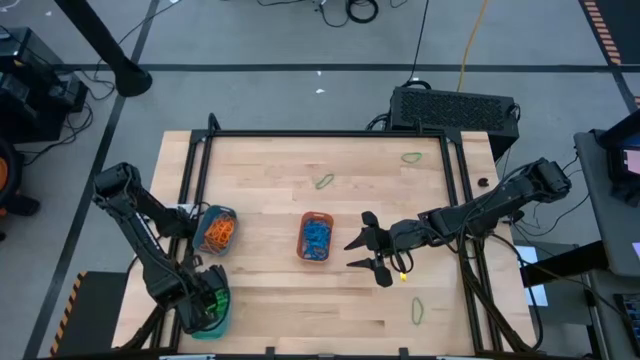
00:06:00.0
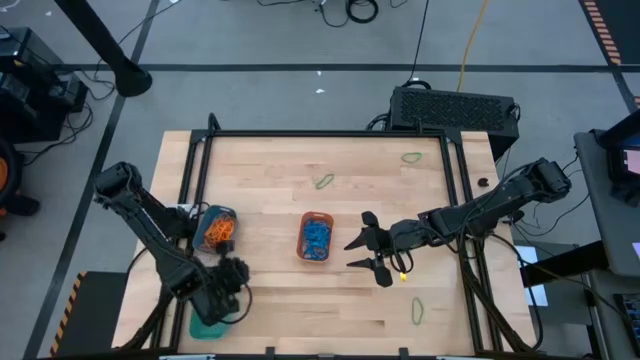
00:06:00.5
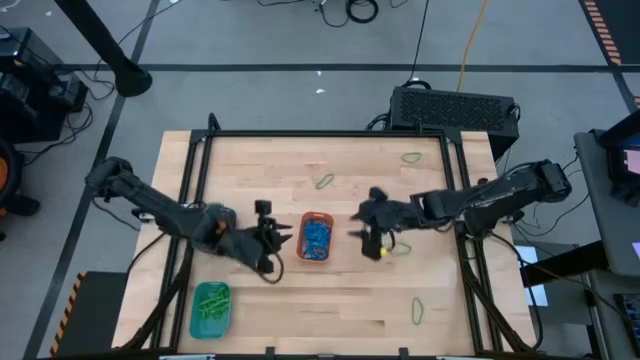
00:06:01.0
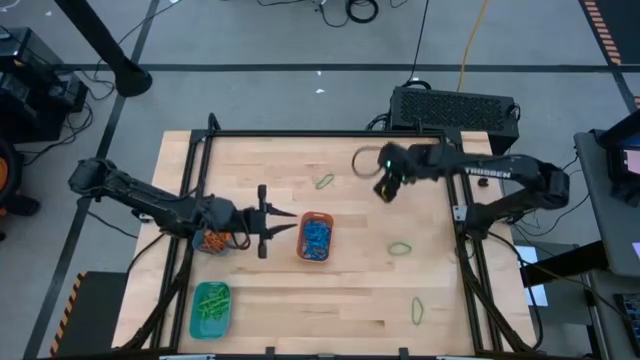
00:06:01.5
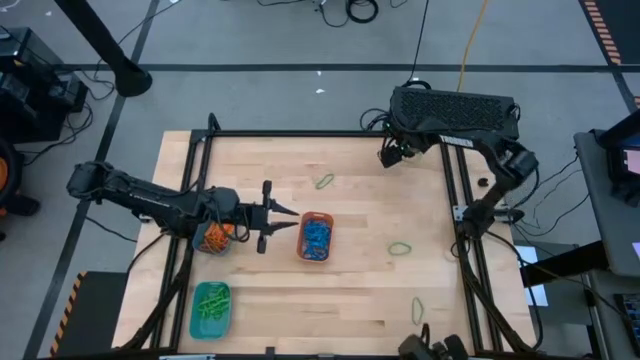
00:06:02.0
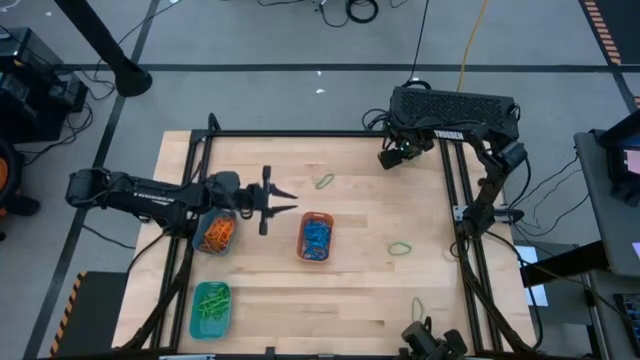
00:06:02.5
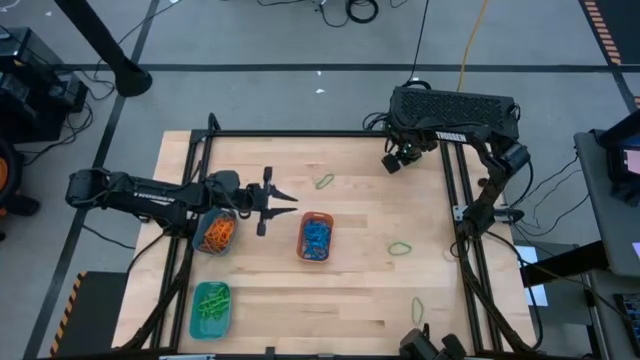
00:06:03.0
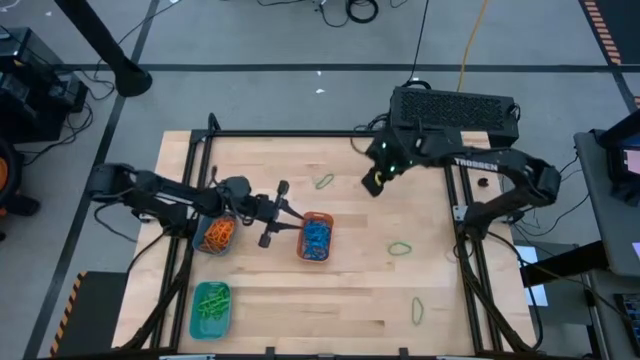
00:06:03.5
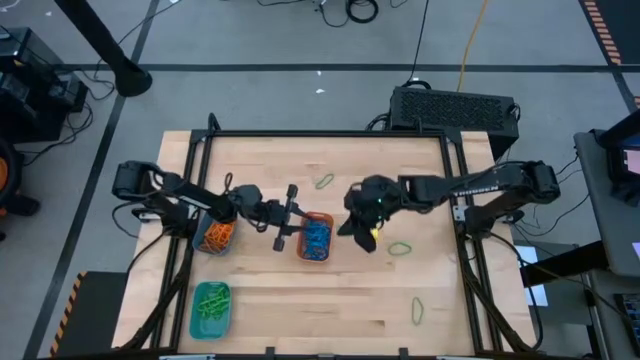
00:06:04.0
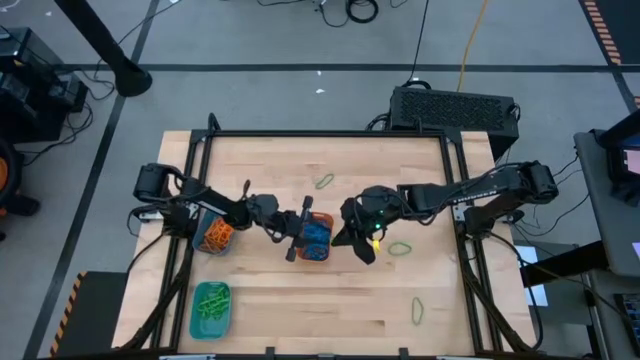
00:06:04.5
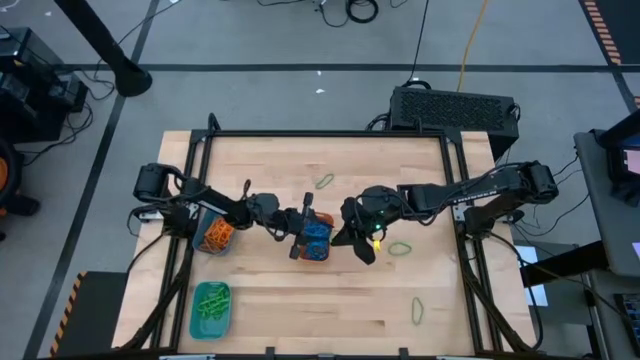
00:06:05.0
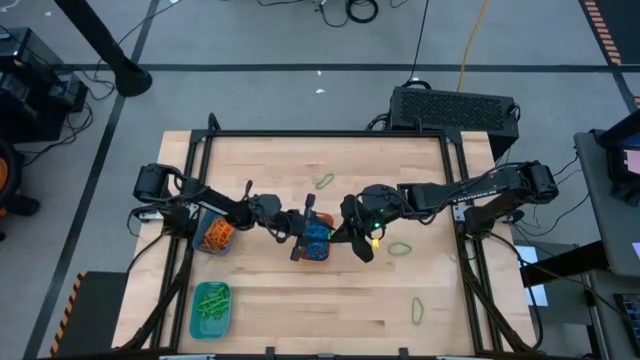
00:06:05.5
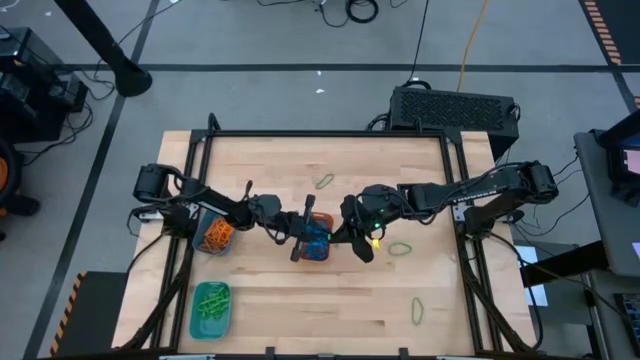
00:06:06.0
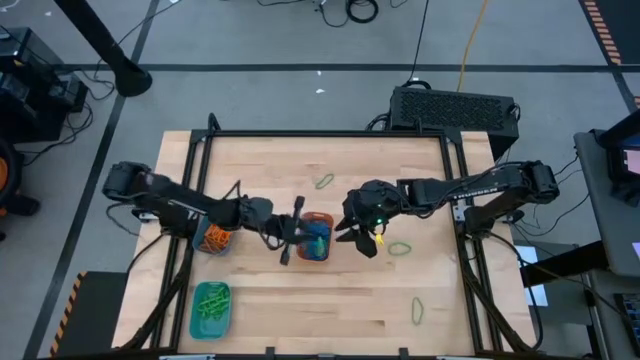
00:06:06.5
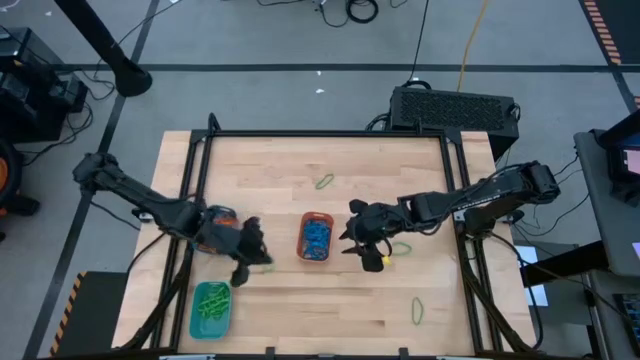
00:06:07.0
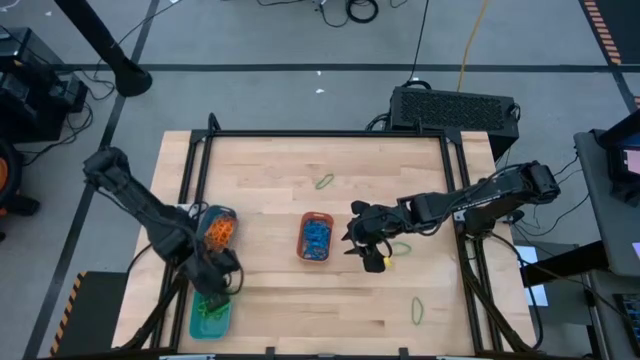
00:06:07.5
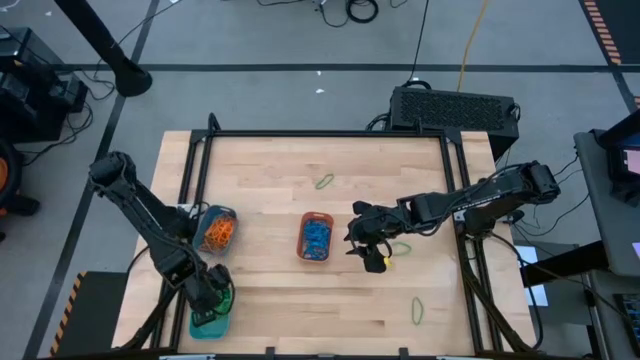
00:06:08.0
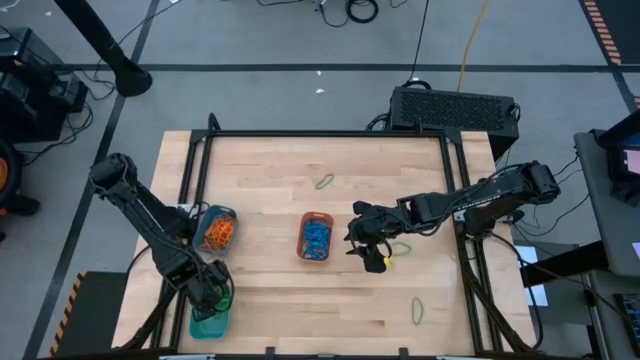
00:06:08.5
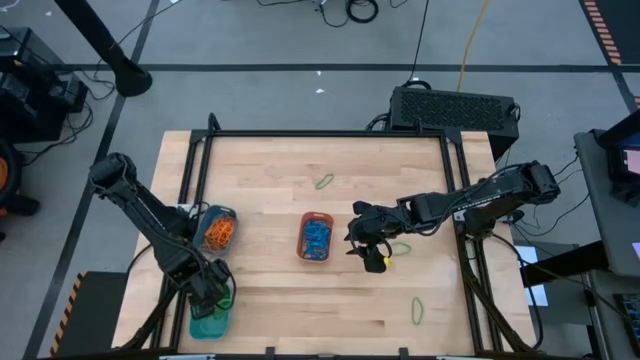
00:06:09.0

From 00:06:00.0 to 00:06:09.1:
Task: Sort rubber bands into baskets
Put the green rubber band into the green bin

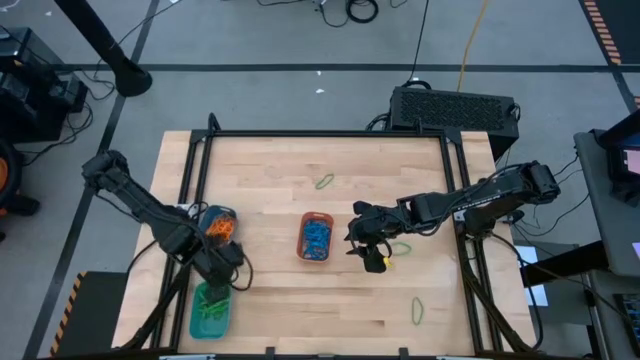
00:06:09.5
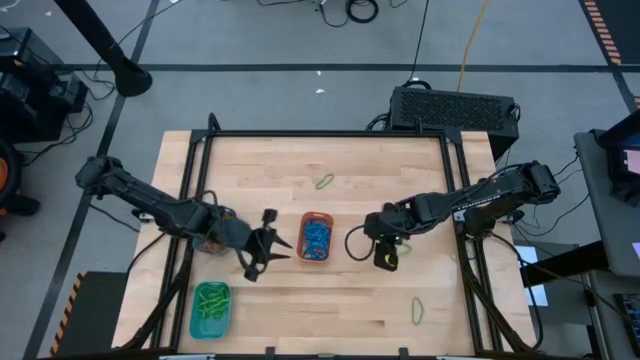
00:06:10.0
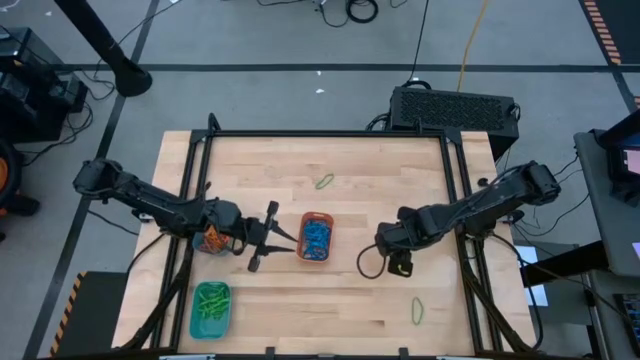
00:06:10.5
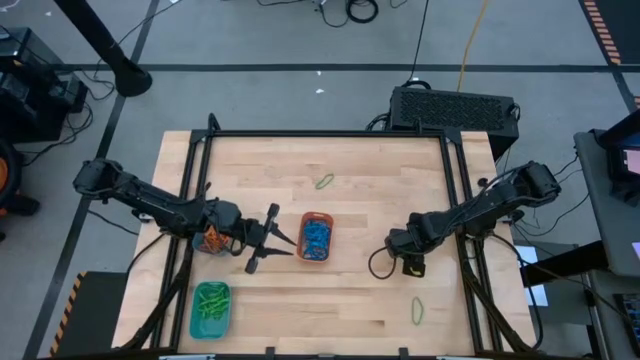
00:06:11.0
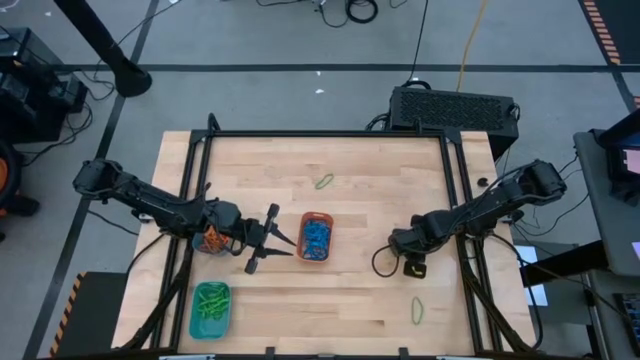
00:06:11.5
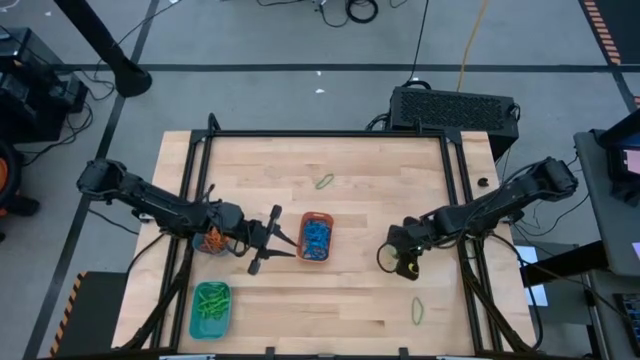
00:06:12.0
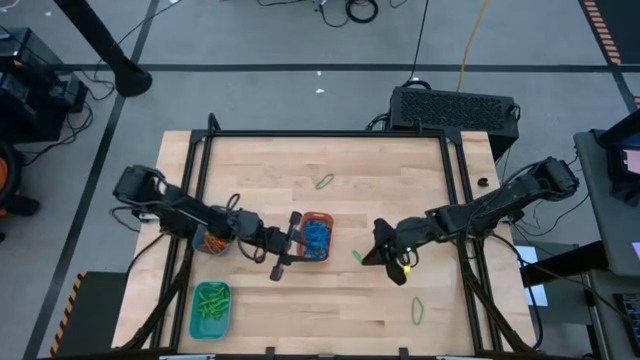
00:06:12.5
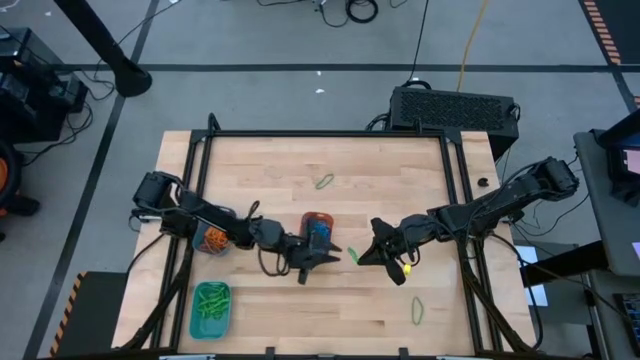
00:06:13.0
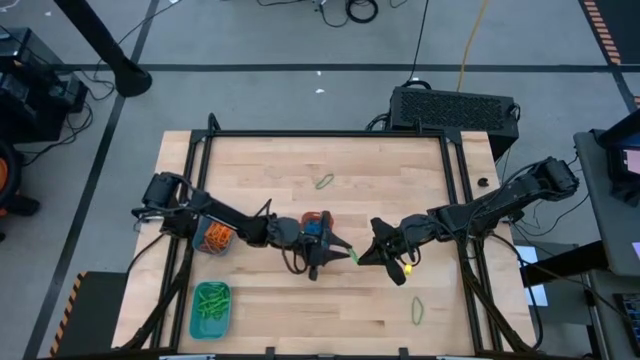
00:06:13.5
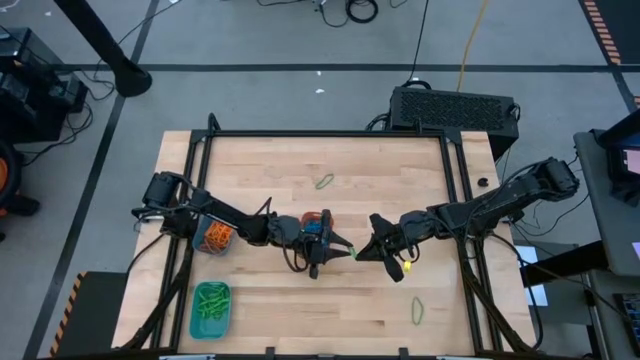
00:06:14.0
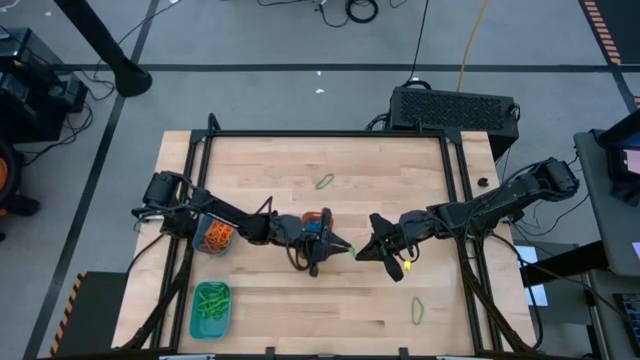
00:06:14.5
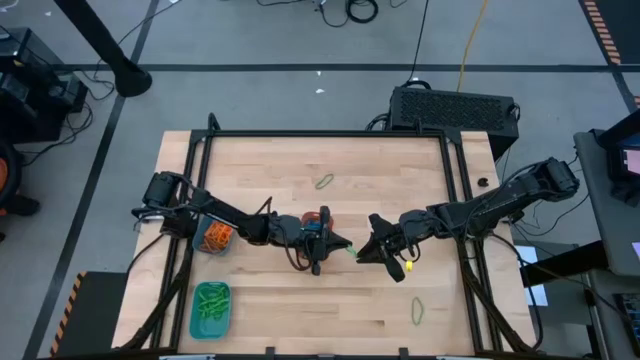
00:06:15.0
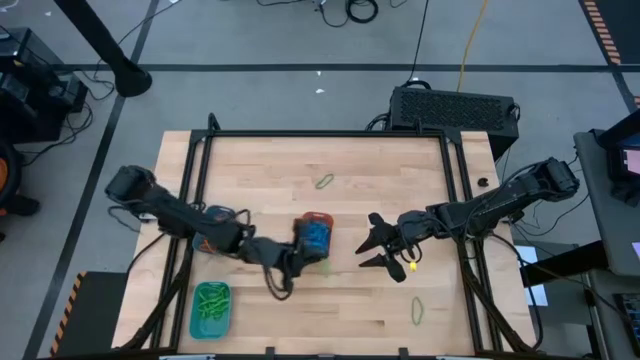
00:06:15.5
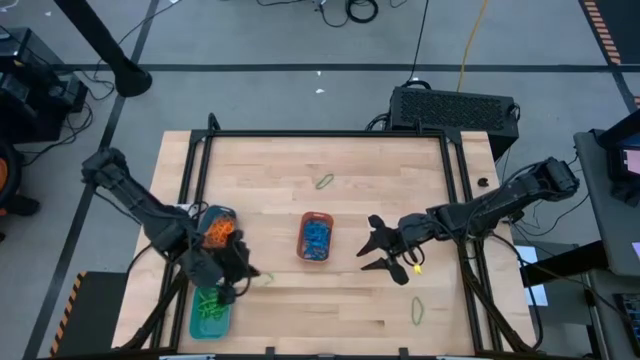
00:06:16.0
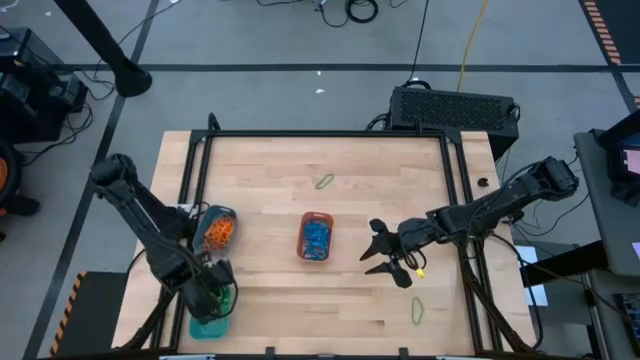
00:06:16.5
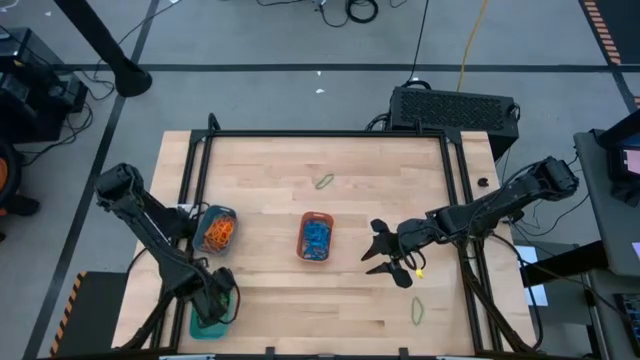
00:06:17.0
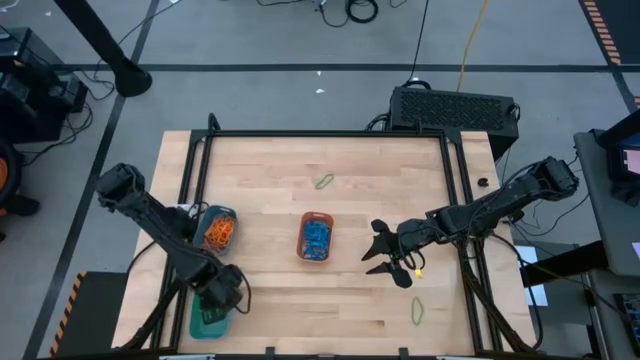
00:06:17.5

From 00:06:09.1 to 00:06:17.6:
Put the green rubber band into the green bin

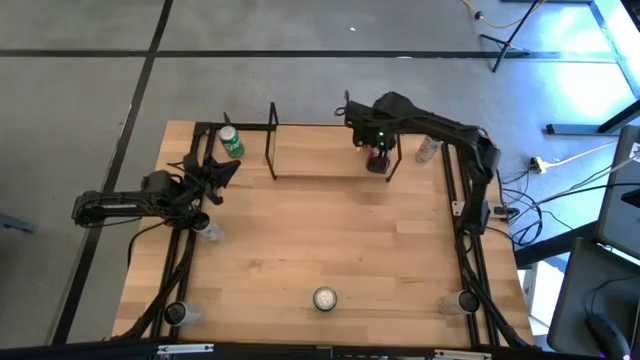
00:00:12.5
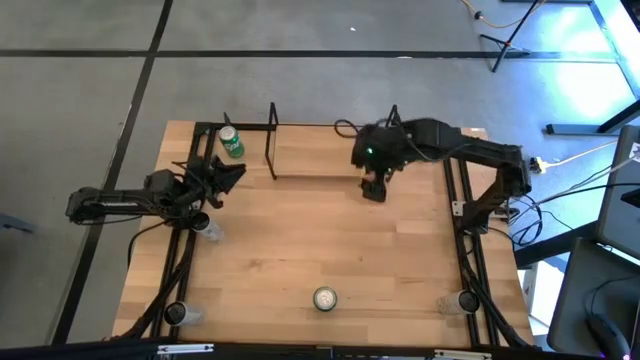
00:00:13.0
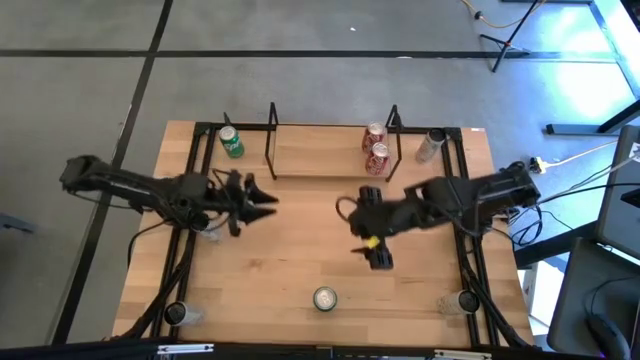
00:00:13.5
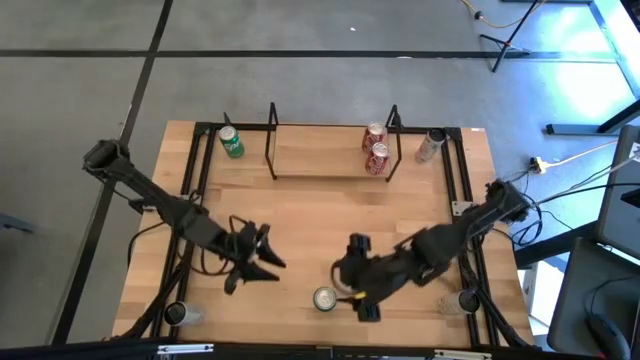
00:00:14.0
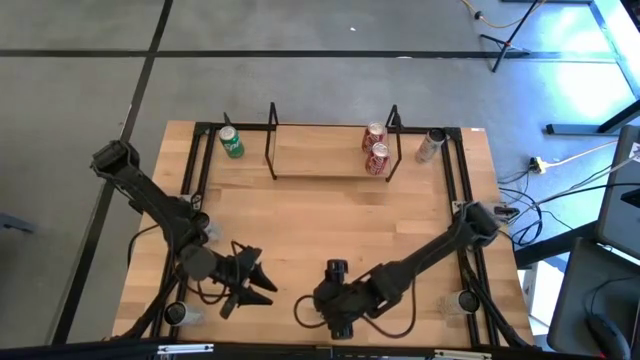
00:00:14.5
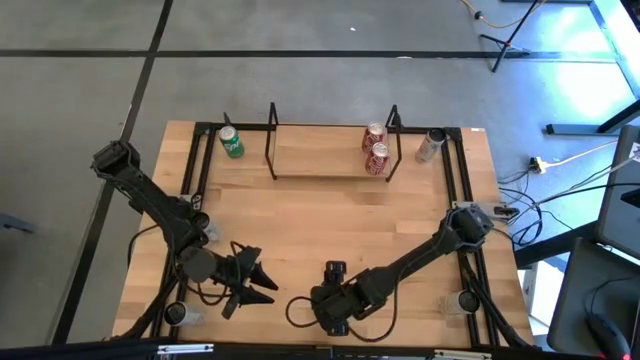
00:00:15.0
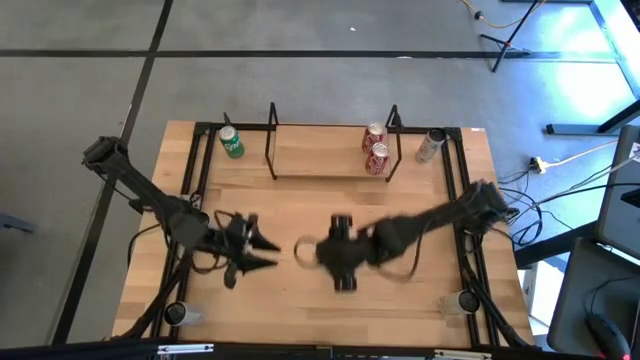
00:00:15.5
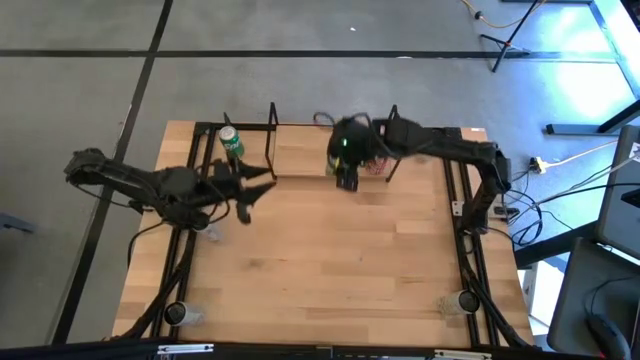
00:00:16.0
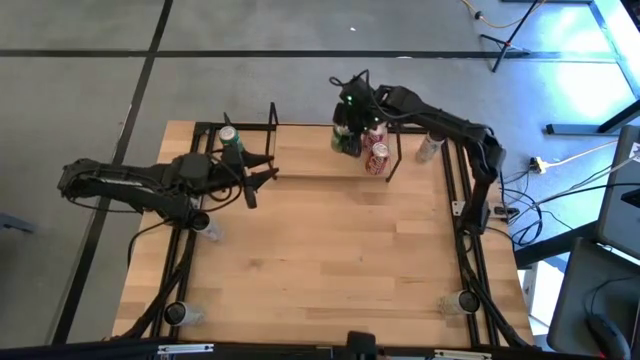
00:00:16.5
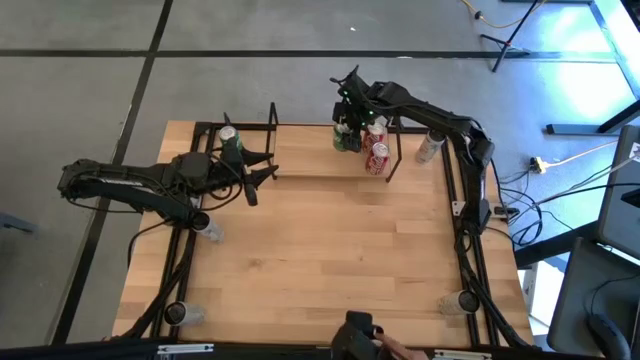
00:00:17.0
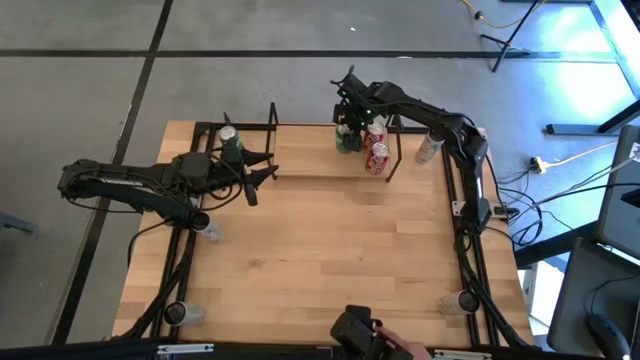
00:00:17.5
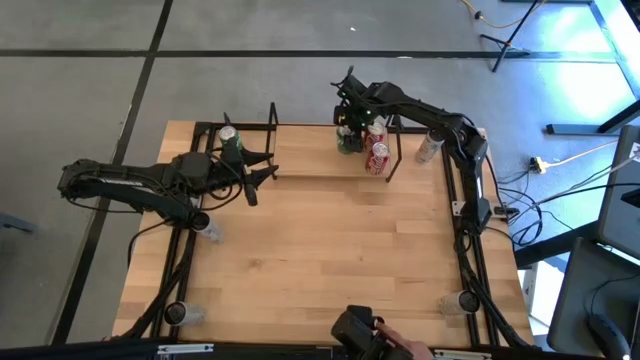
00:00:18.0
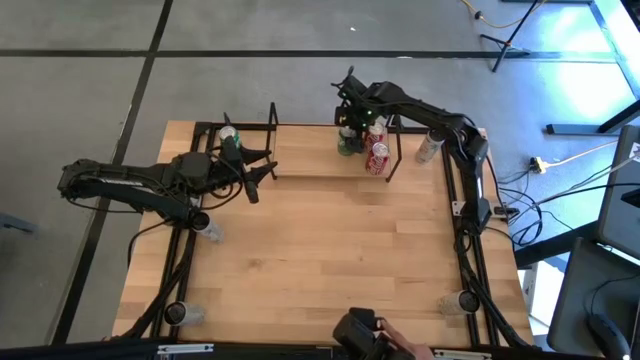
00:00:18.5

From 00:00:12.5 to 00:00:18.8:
Task: Place canned beverage on shelf
Put the bottom green soda can on the shelf
